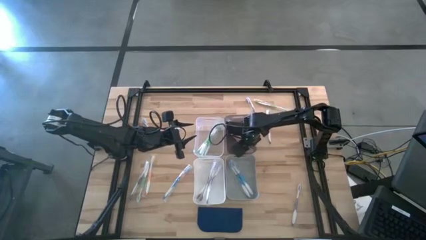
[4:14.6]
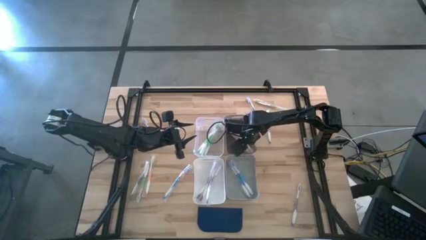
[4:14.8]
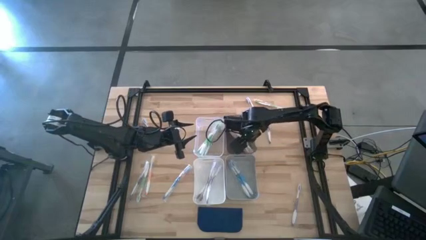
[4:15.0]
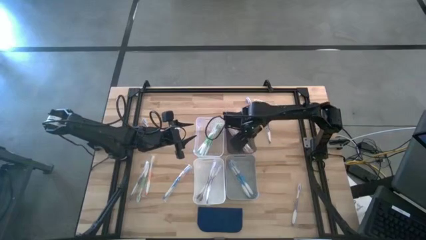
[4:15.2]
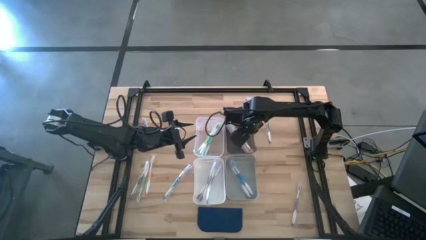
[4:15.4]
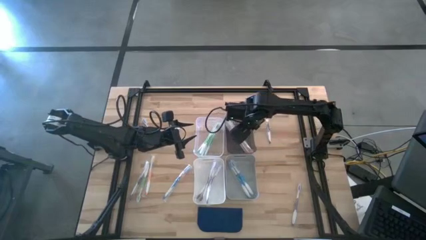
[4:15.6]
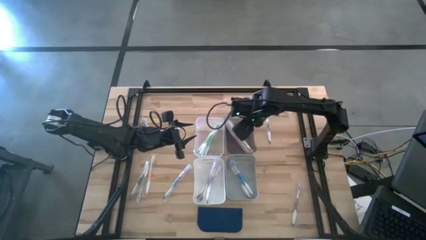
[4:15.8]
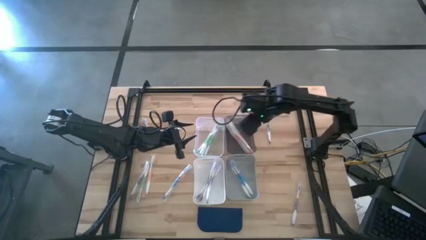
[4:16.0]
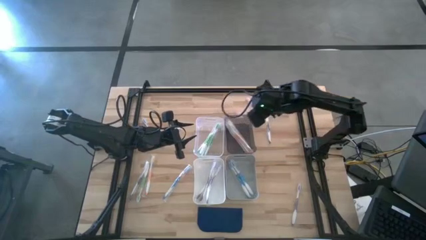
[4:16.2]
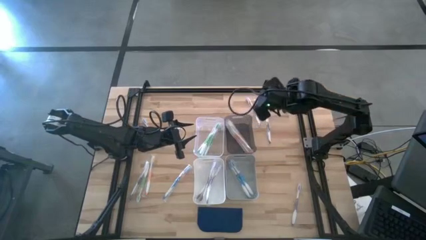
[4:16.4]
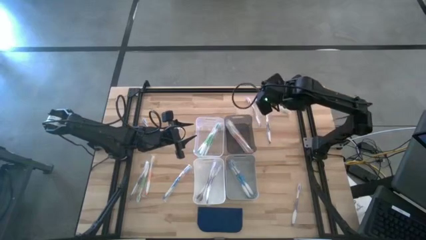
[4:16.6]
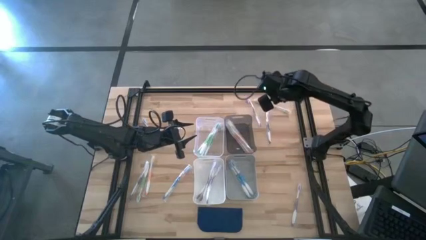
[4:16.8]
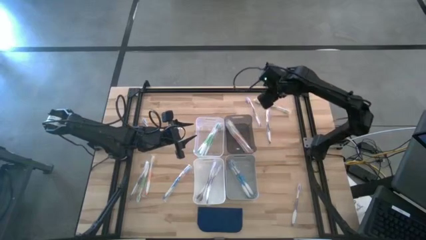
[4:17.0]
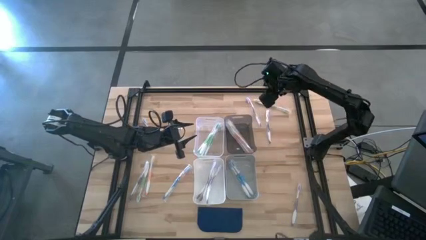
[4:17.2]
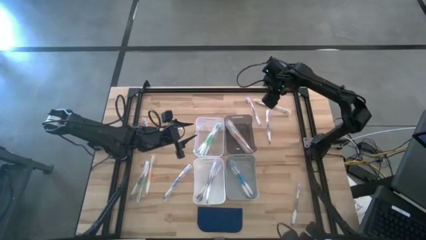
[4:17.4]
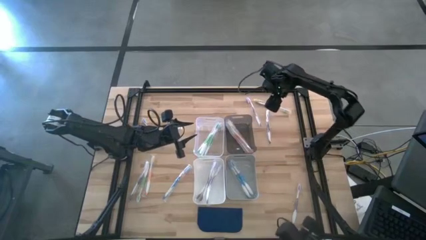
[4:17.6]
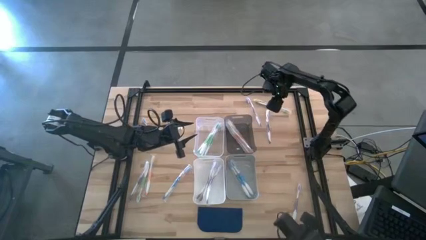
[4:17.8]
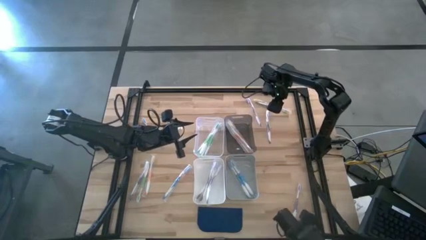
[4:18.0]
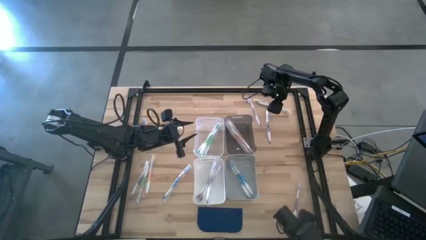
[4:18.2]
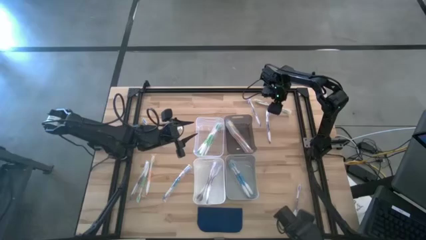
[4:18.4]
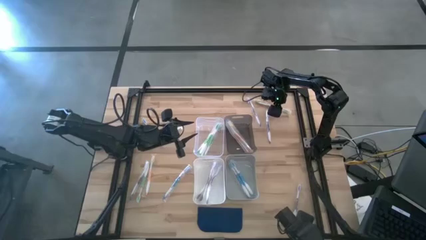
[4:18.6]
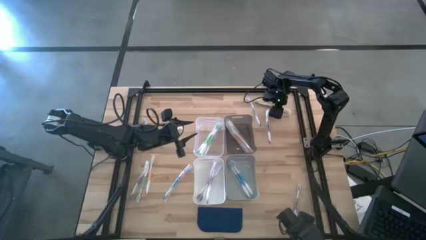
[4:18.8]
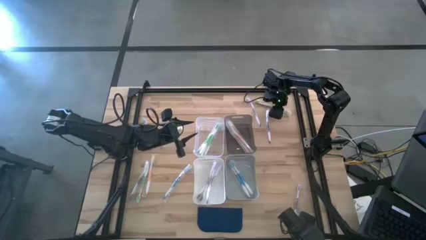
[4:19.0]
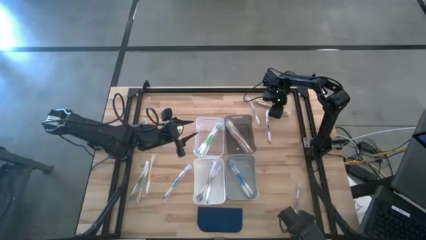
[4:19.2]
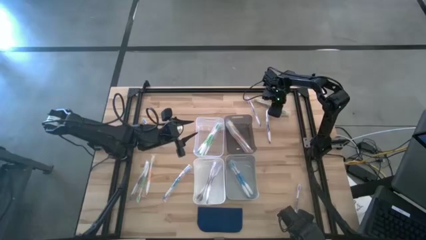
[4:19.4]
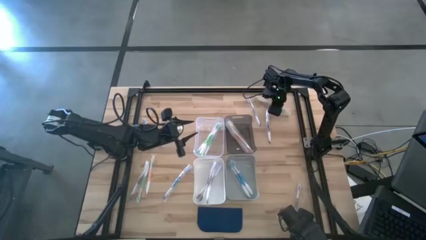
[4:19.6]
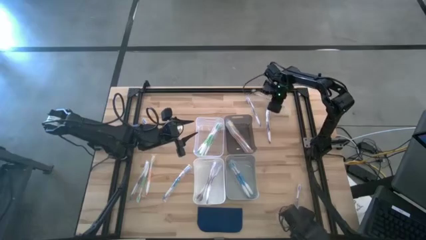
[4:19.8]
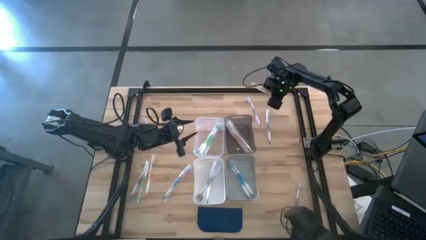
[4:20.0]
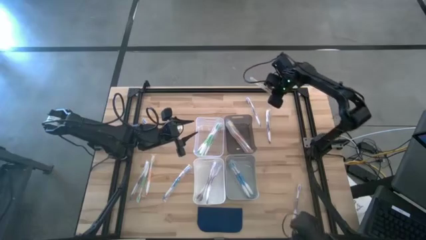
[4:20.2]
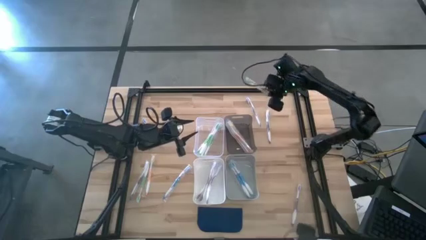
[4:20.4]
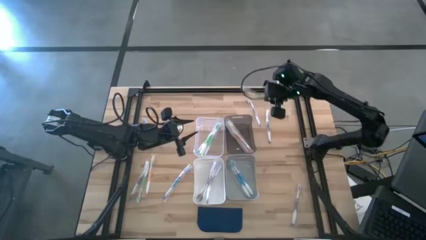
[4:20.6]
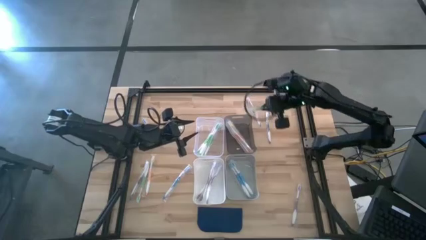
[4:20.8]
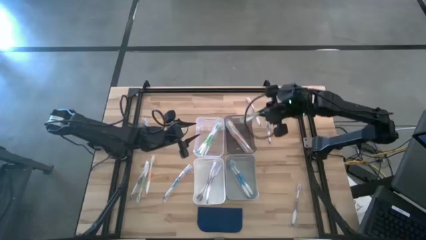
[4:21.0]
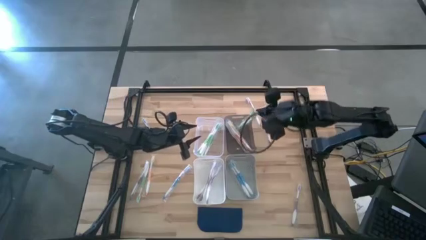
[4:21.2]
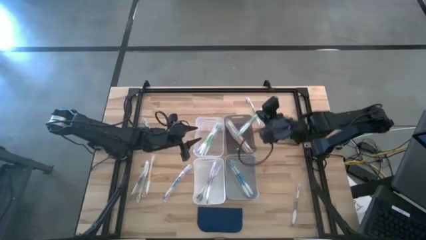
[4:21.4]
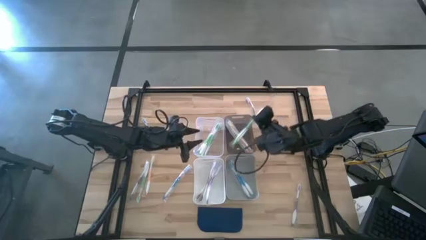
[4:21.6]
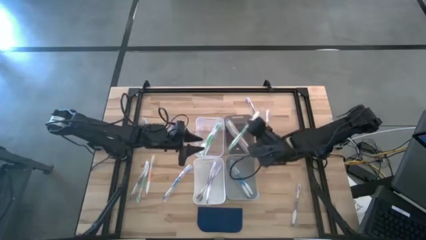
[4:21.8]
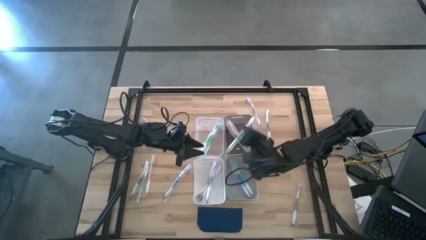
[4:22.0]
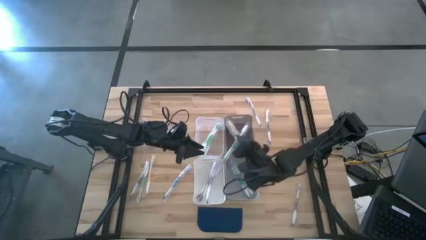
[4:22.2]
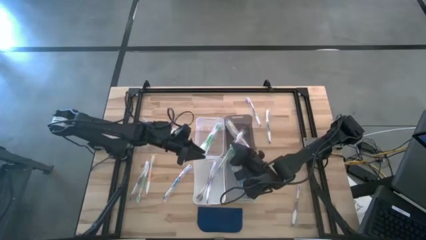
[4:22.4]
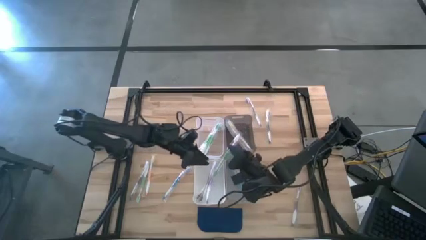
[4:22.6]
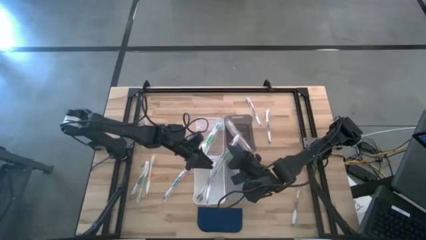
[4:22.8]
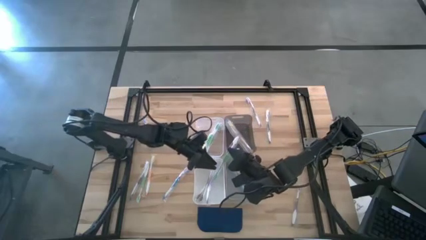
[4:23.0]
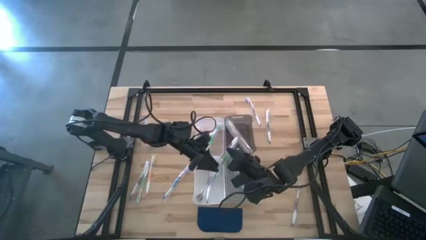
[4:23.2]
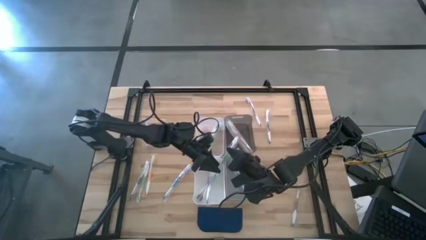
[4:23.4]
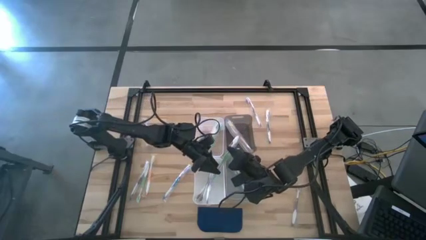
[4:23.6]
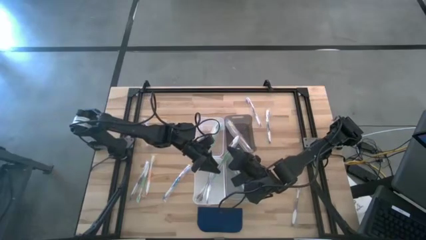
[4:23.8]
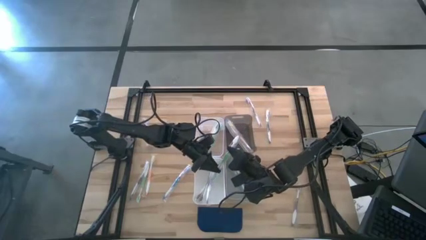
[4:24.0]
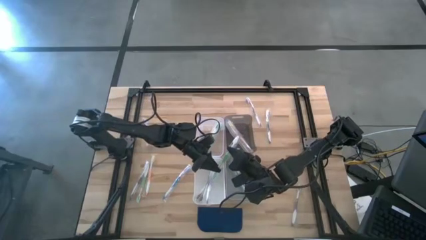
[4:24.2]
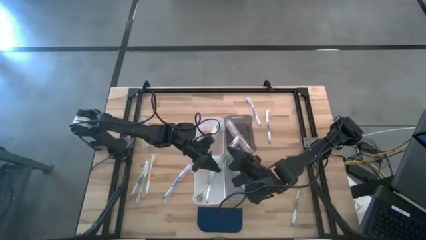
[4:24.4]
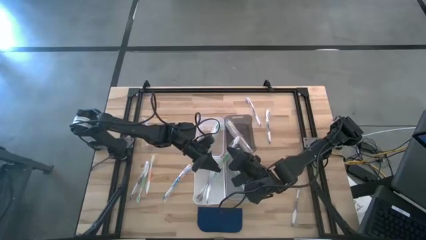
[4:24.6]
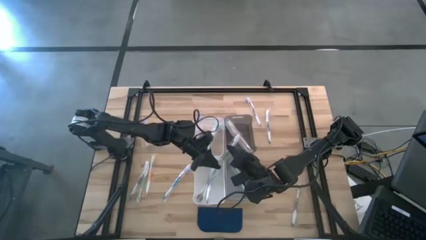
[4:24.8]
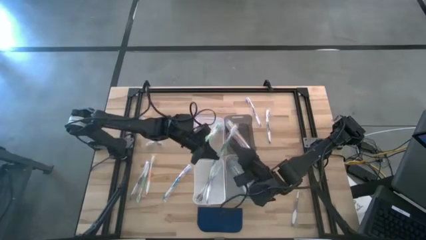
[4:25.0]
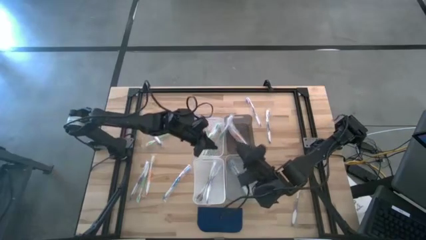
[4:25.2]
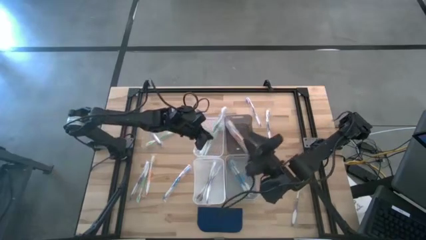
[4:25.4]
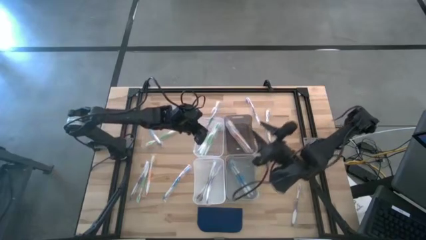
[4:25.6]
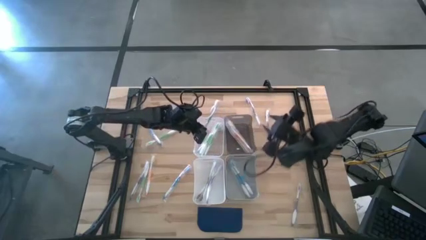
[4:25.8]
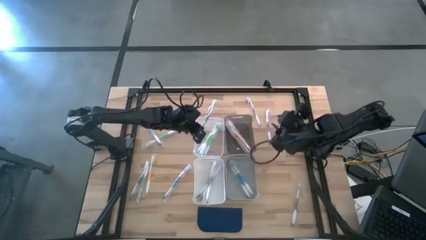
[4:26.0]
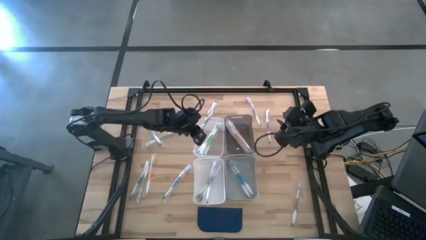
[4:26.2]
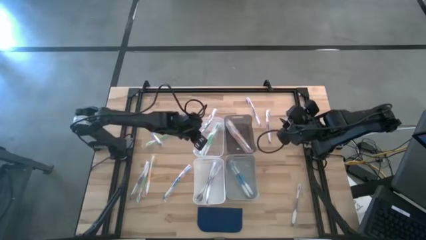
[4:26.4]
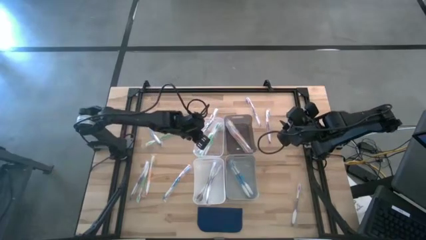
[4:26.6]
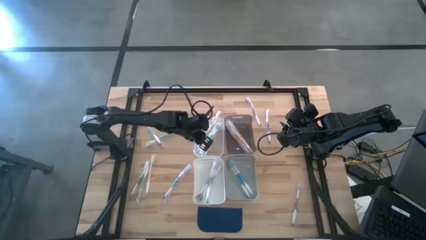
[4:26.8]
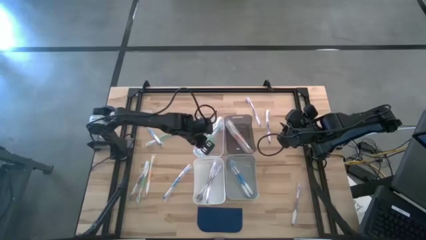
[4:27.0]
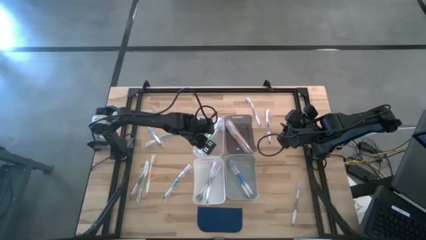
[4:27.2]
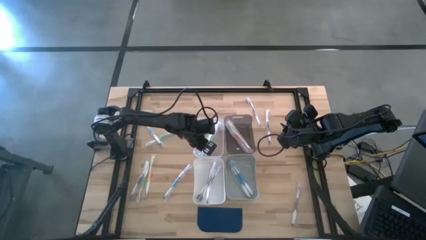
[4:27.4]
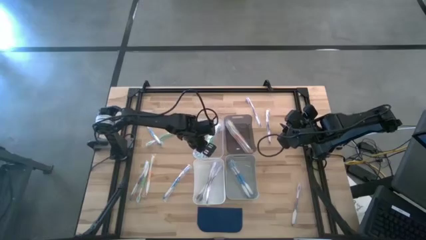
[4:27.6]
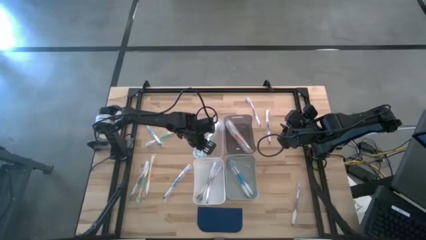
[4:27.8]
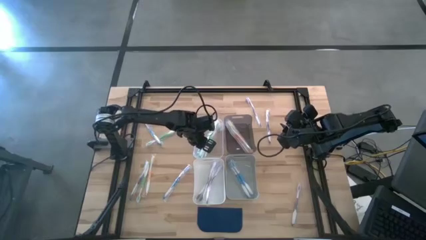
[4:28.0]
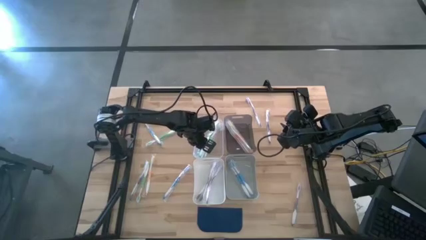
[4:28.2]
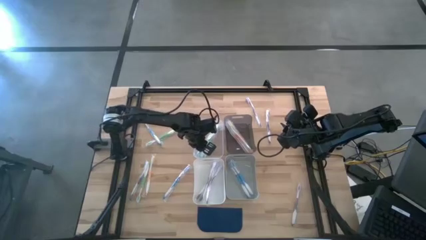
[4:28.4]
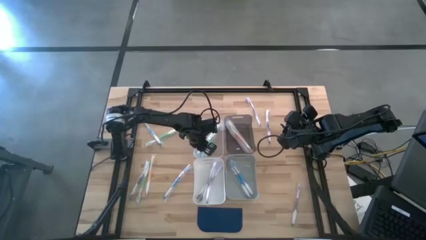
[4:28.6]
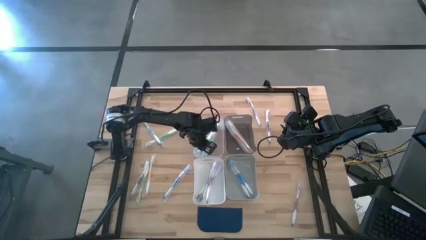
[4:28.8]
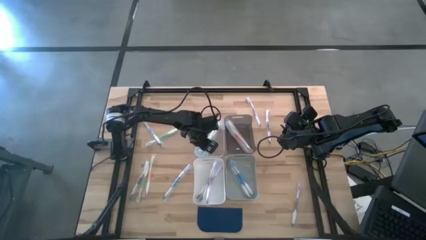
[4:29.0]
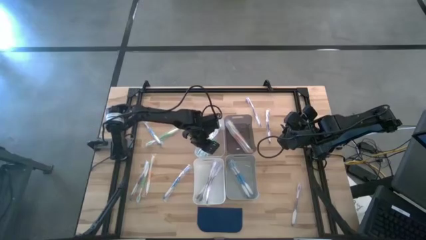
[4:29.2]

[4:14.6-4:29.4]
Task: Pick & Place Toothbrushes
Put the green toothbrush into the transparent bin

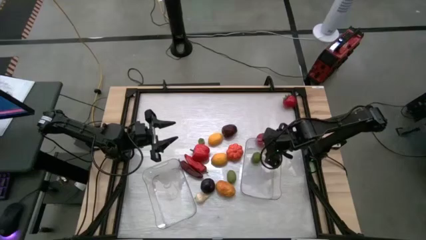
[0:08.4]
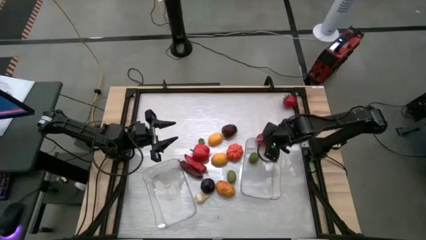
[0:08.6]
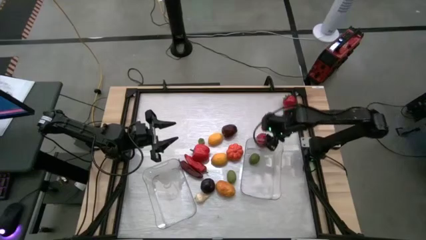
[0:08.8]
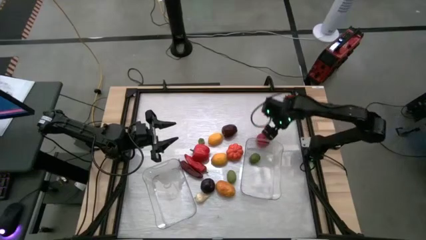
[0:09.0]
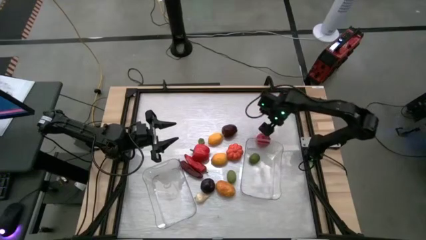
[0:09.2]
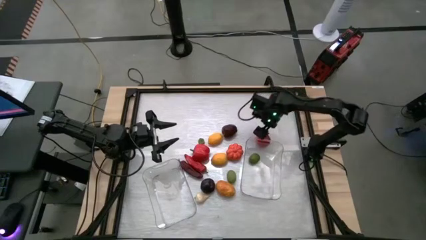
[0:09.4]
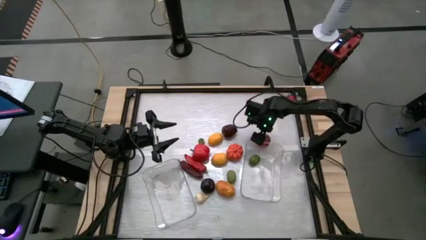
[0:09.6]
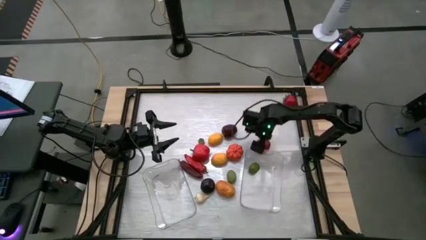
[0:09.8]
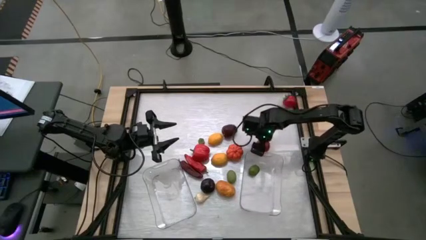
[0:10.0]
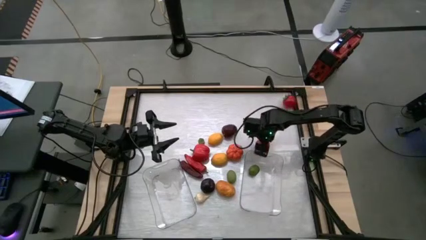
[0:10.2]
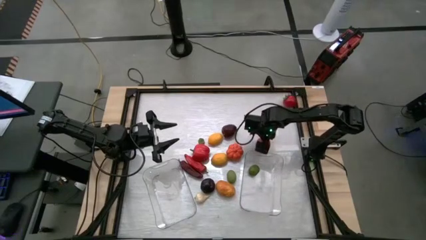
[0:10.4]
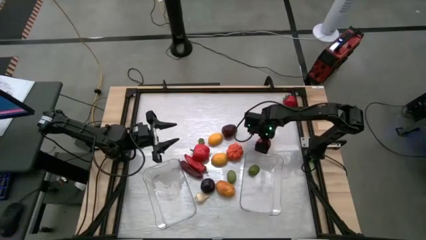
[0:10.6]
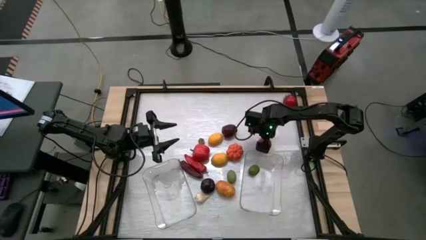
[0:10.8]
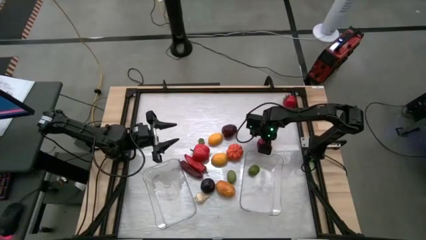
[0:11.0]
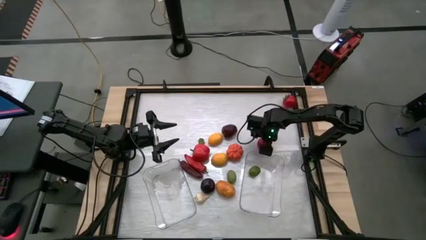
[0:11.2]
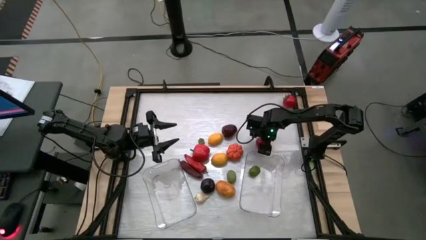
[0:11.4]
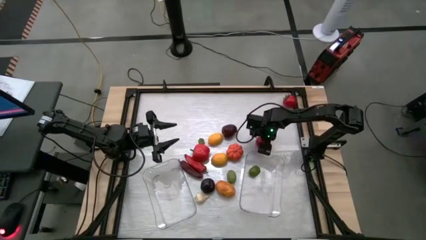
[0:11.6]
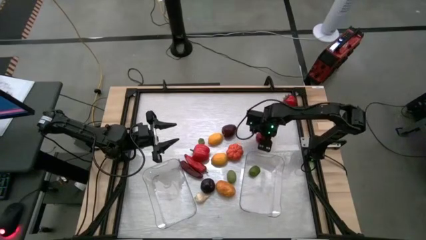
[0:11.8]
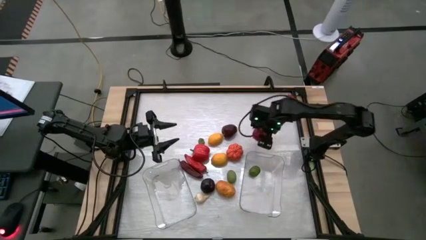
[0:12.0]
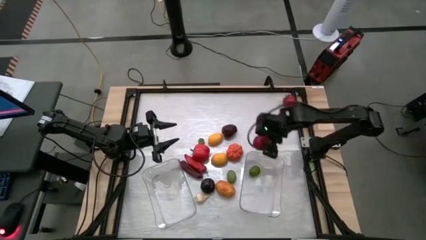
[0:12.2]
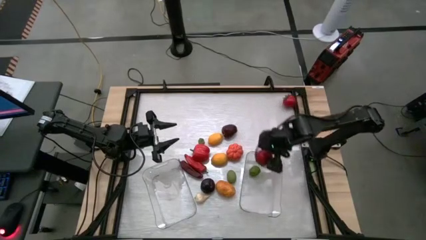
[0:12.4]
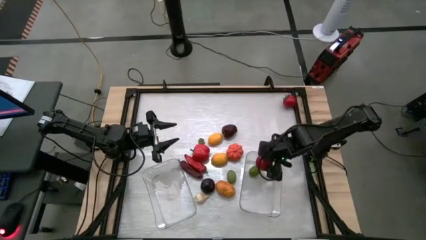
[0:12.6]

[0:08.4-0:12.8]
Task: Sort produce into baskets
Put the bottom tomato into the right transparent bin
